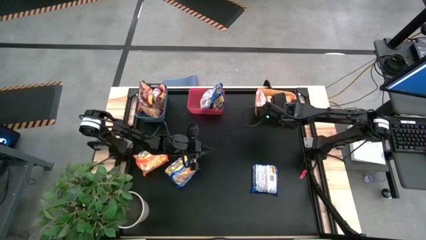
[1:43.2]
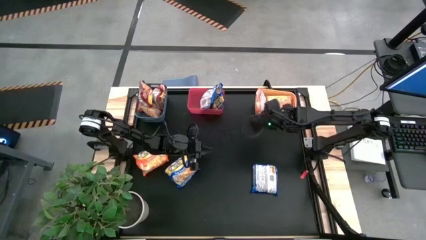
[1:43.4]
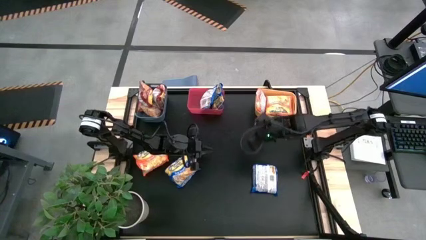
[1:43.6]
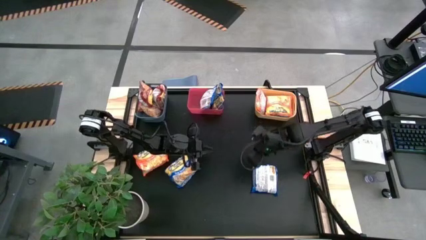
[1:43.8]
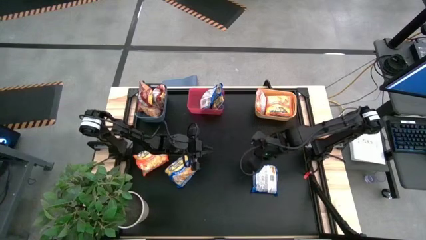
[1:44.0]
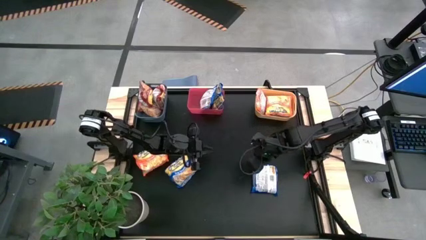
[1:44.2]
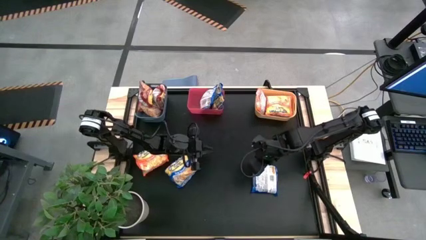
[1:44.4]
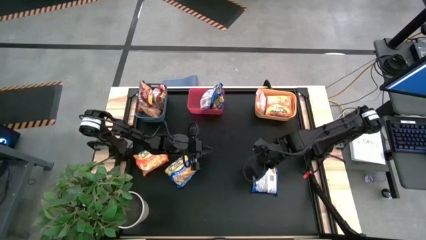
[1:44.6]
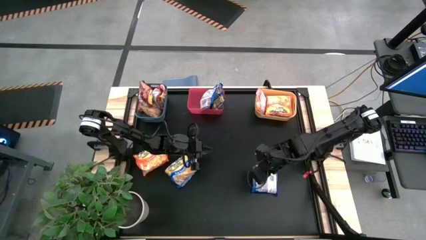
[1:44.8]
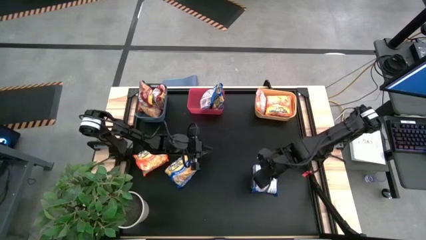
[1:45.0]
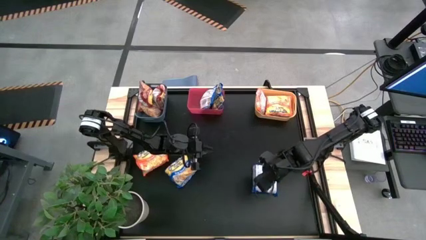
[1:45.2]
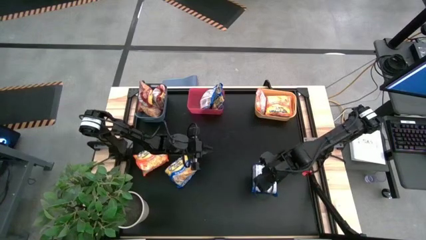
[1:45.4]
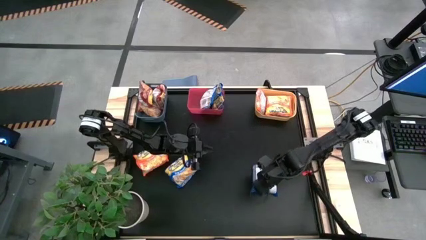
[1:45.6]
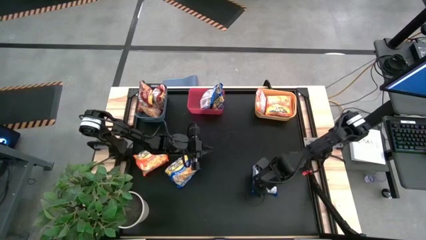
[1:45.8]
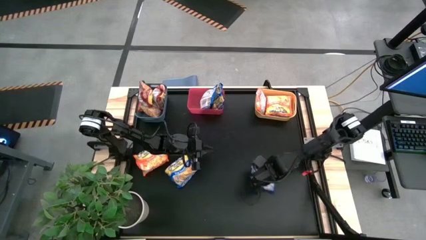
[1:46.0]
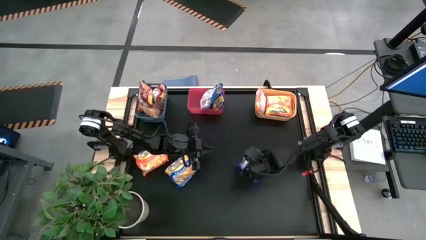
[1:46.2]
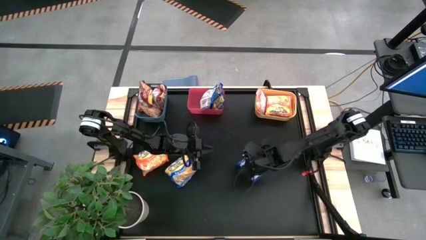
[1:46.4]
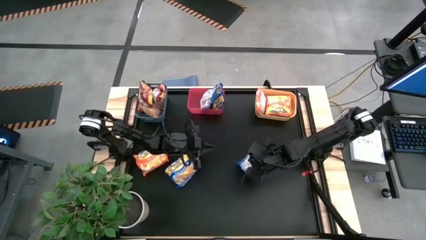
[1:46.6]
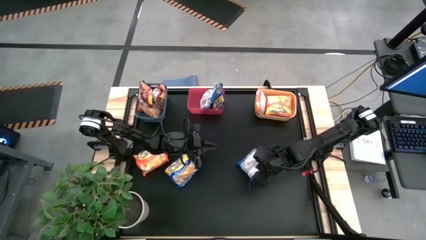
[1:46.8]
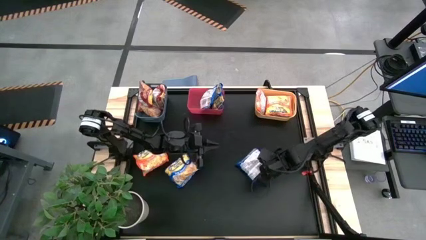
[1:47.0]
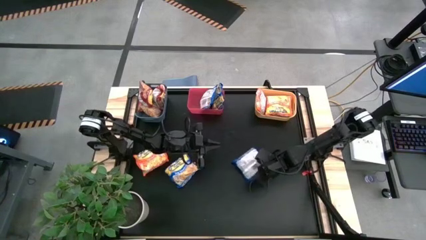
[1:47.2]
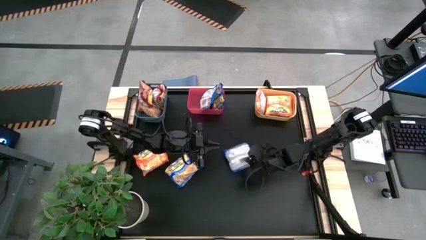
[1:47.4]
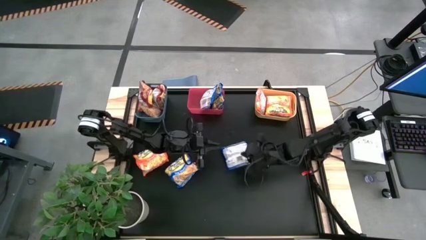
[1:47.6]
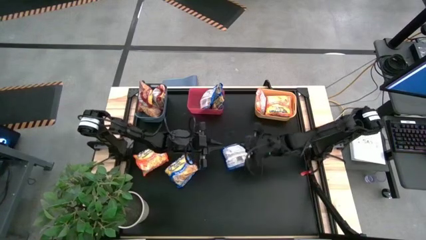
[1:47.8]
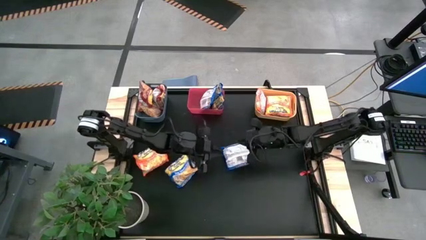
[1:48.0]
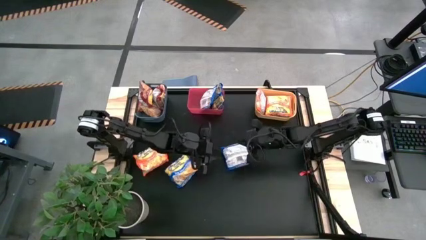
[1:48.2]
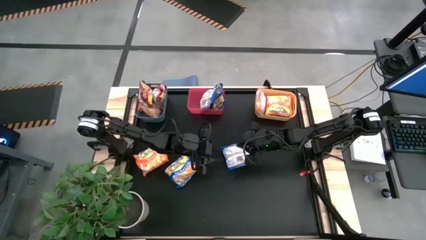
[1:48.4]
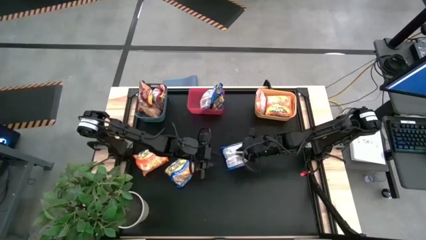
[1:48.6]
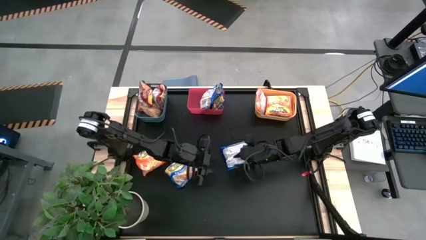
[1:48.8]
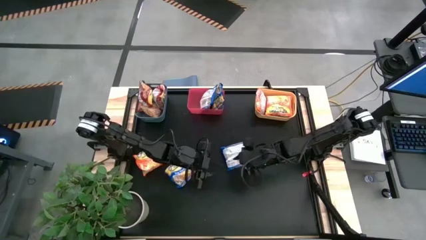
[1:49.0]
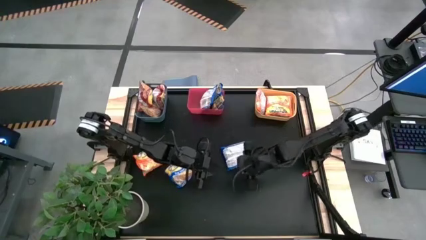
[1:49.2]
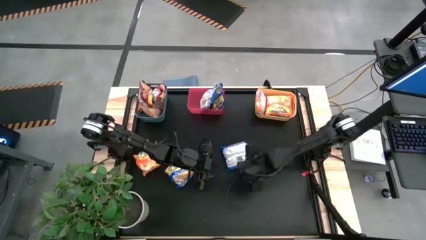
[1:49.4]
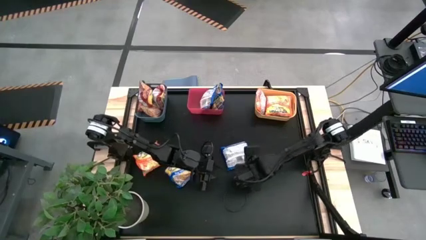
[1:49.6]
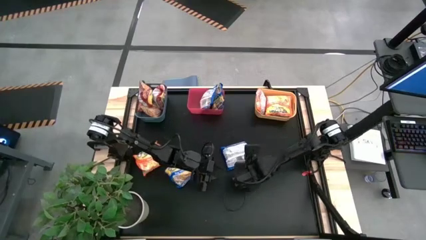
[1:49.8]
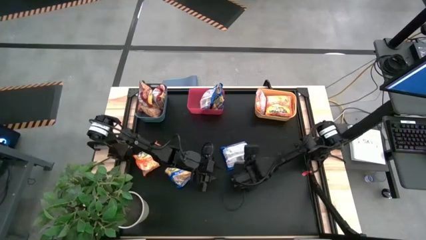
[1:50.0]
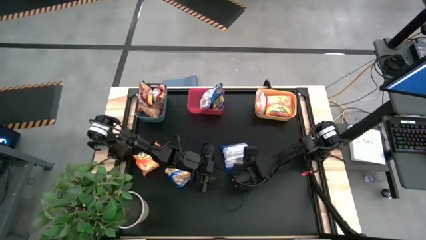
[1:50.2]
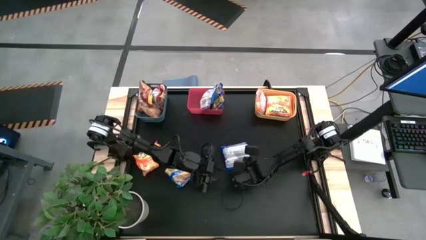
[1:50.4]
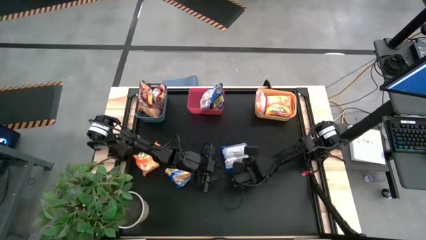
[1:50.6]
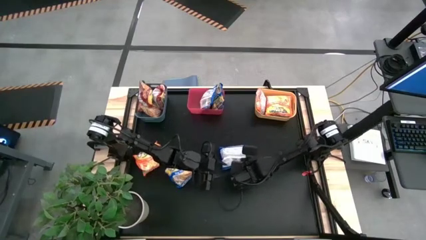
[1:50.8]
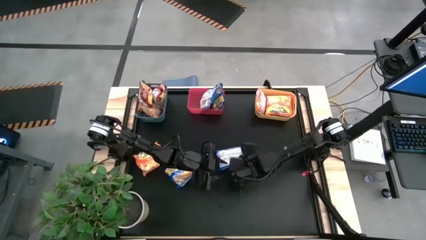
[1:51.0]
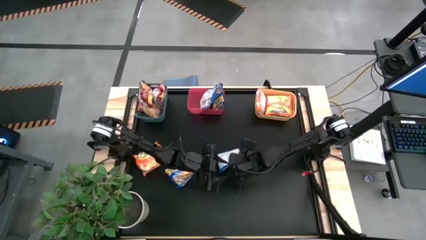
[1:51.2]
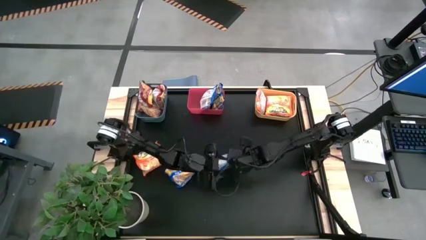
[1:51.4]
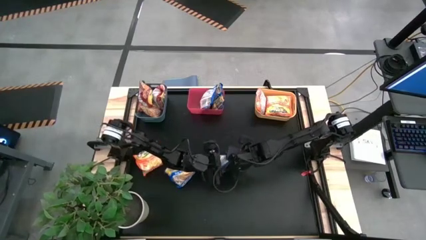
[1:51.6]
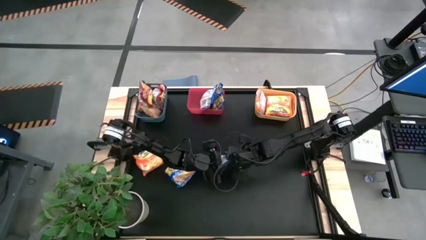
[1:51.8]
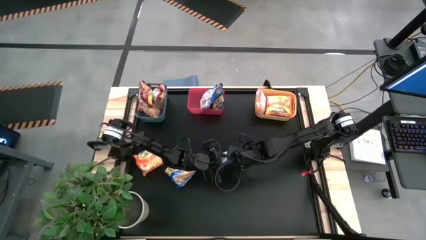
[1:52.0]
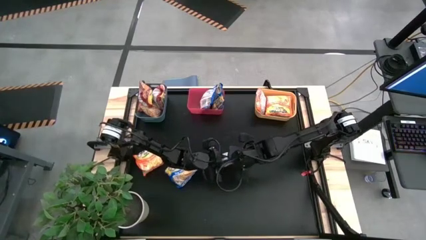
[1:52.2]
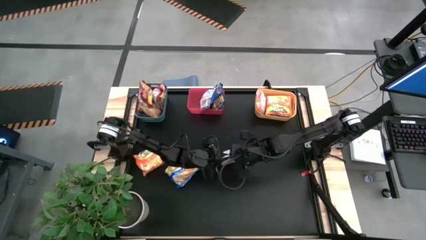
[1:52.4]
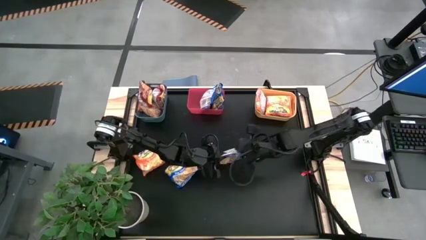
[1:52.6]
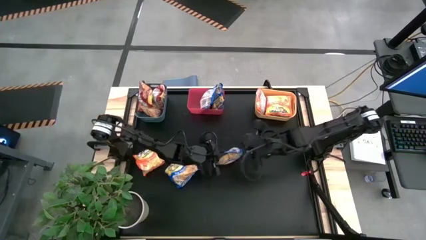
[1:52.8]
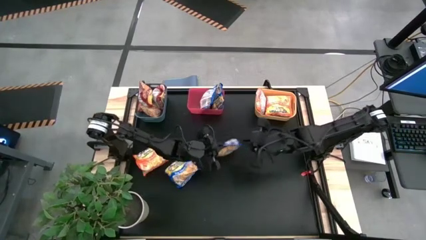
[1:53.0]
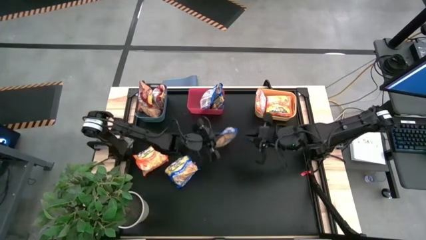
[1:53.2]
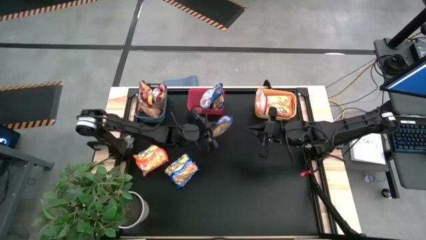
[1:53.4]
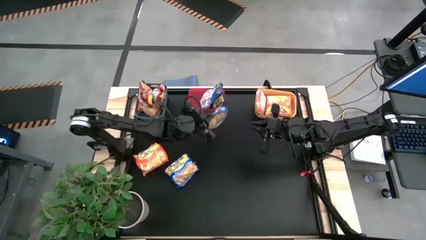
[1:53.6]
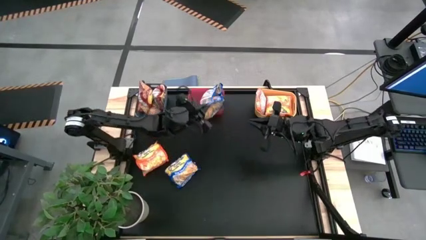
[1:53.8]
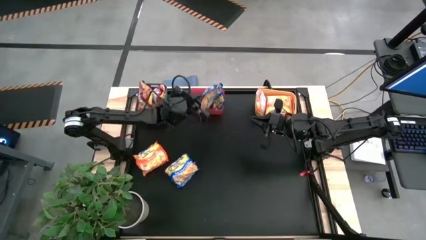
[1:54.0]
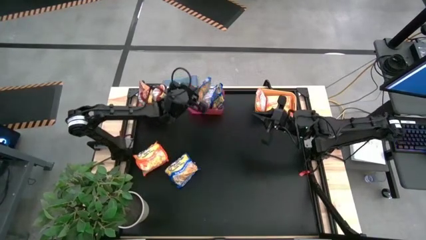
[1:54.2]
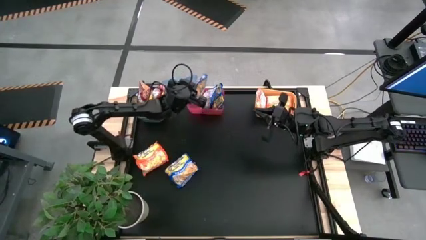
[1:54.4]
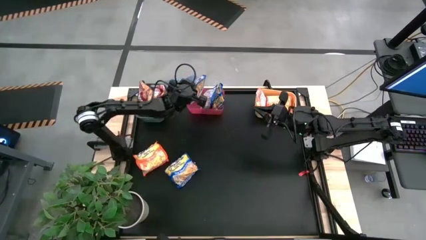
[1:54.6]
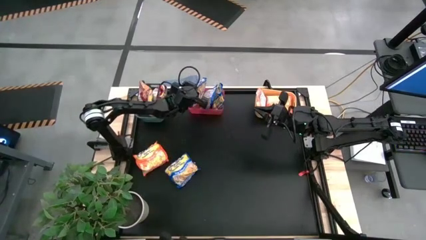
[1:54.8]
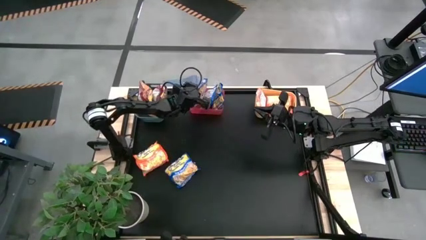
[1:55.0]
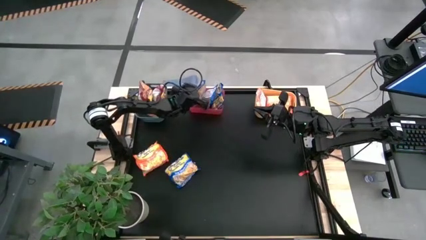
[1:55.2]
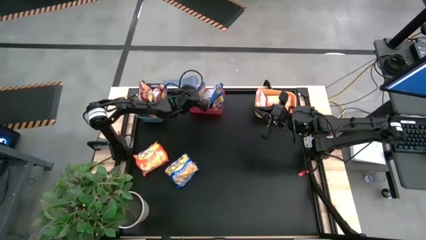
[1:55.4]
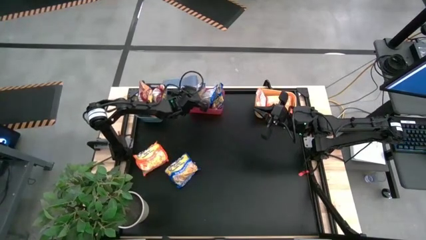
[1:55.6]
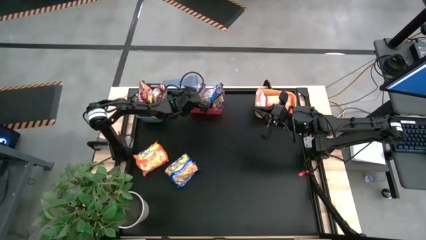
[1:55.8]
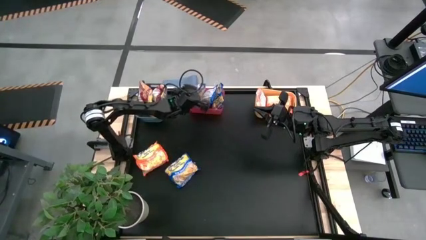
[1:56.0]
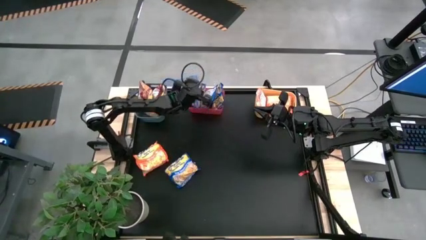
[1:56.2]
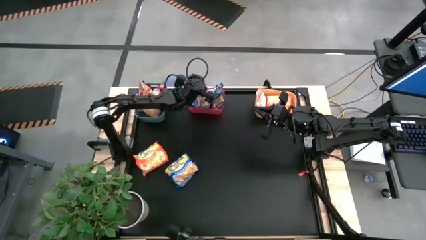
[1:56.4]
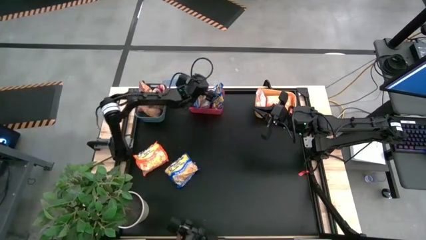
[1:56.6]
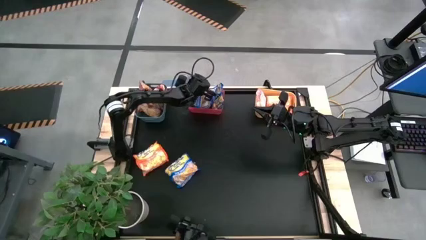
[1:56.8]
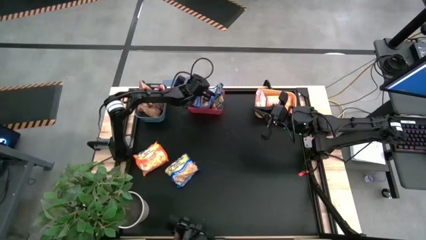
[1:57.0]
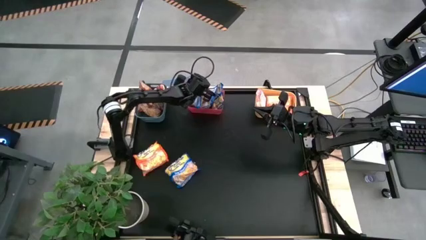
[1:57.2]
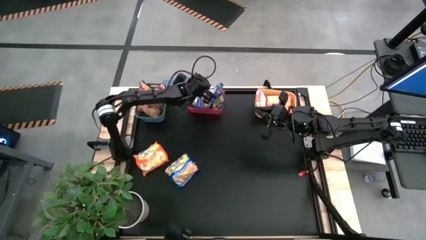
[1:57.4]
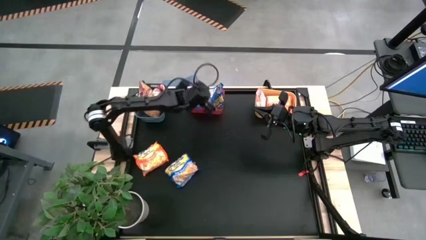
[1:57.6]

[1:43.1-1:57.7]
Task: Sort Maruchan noodles
Put the blue noodle pack into the pink bin
